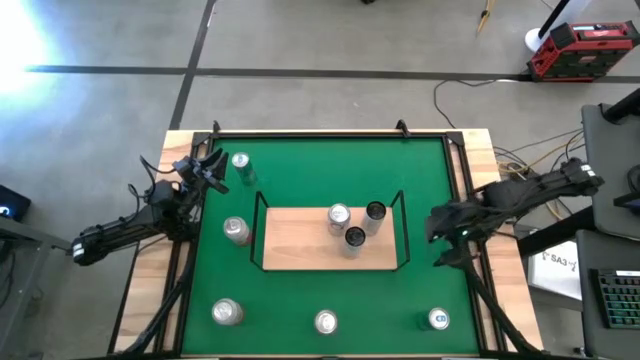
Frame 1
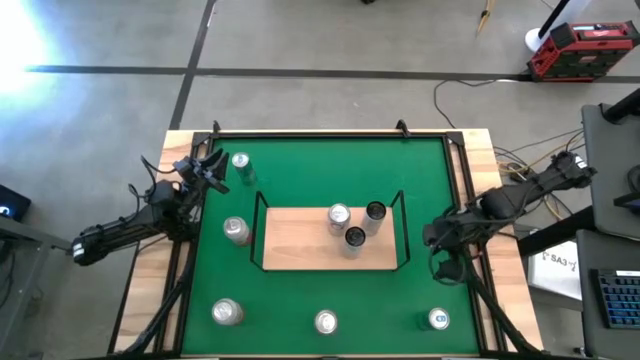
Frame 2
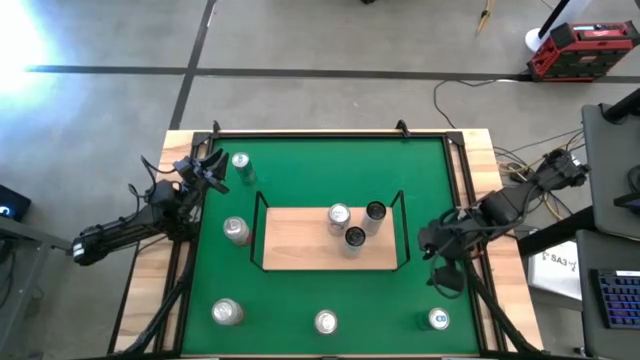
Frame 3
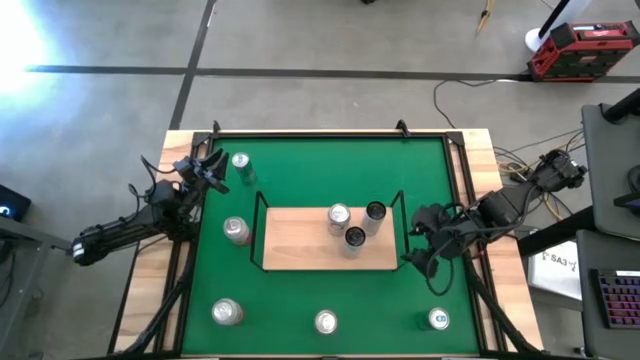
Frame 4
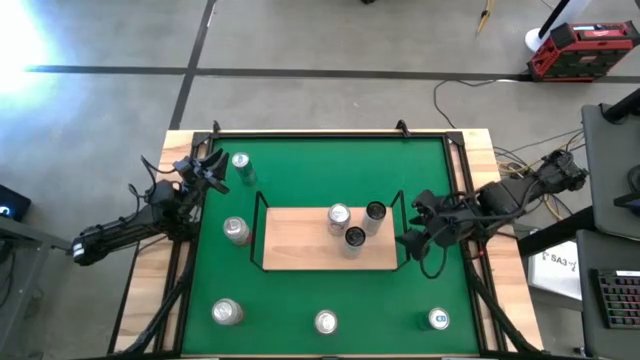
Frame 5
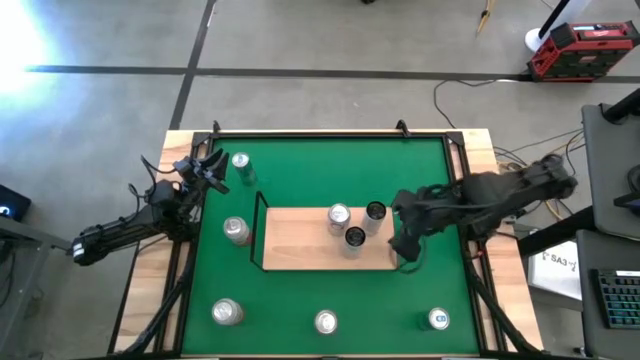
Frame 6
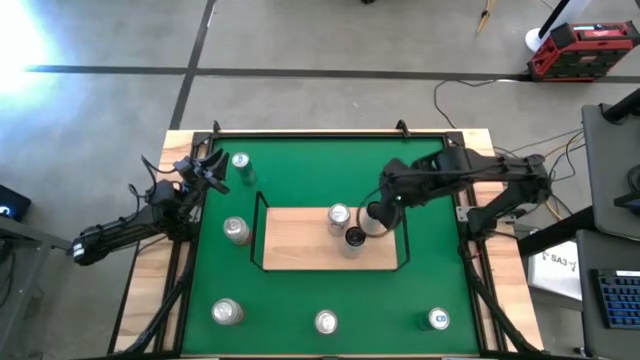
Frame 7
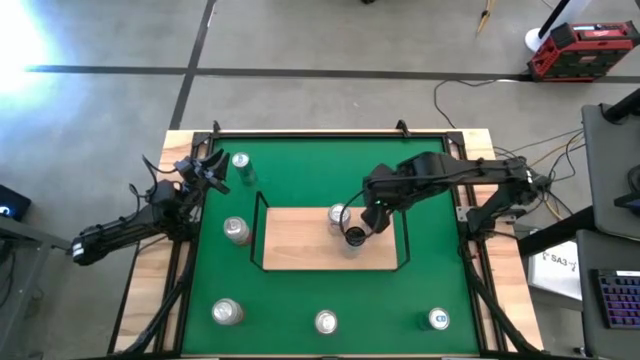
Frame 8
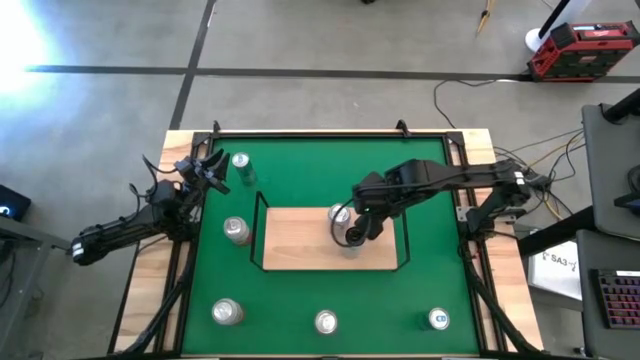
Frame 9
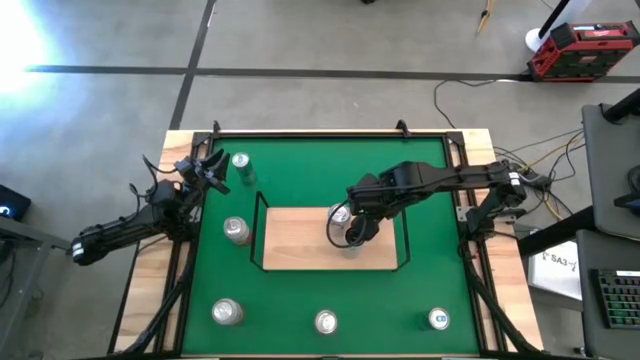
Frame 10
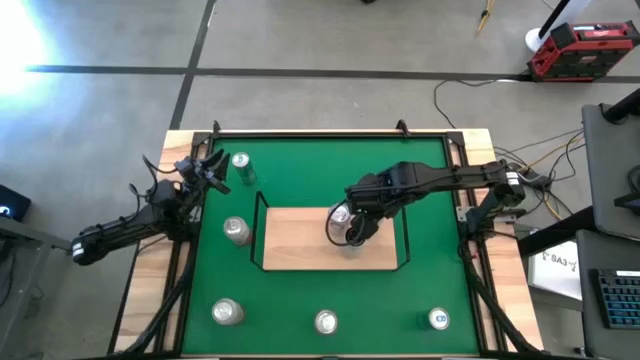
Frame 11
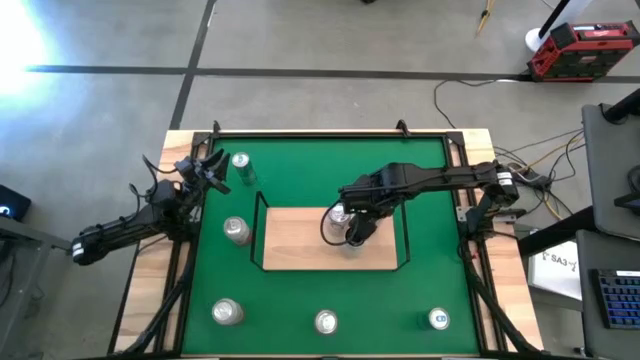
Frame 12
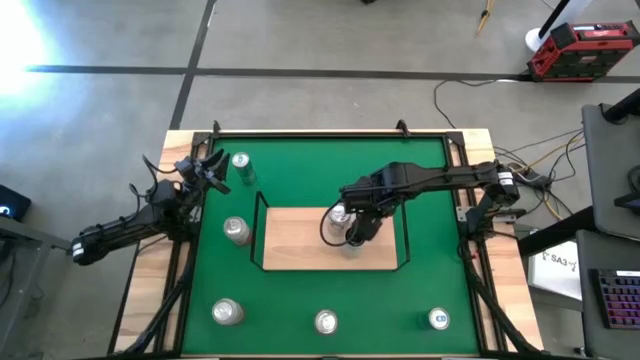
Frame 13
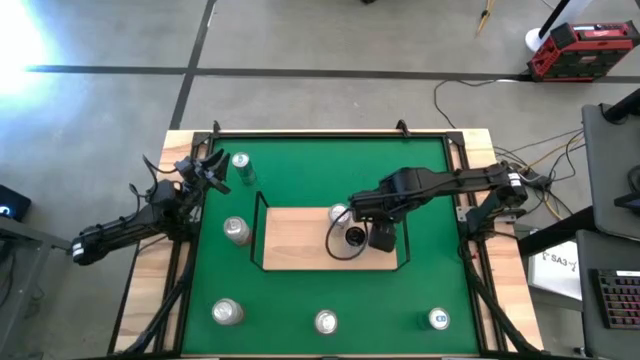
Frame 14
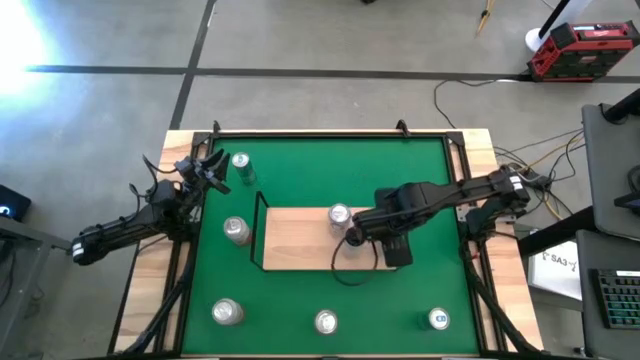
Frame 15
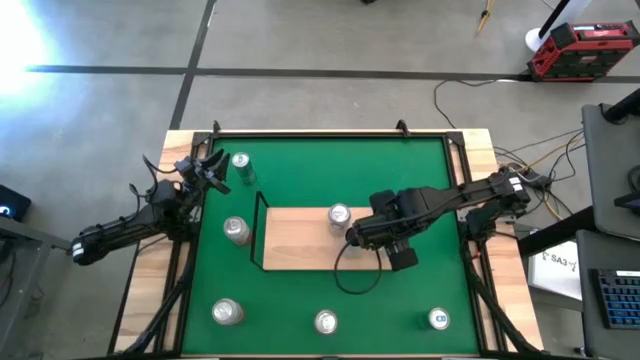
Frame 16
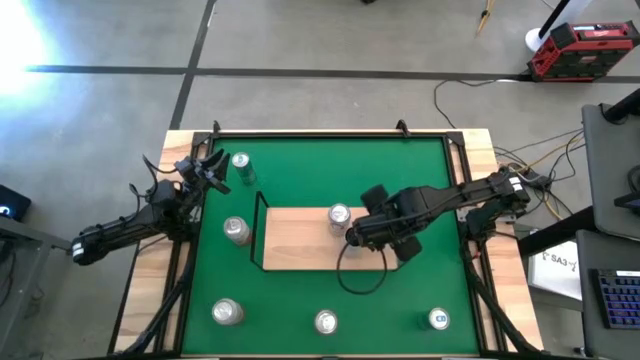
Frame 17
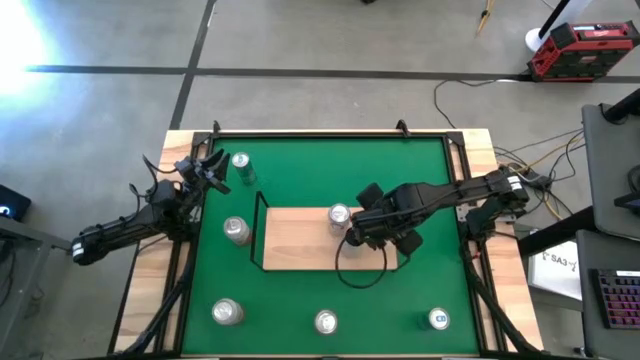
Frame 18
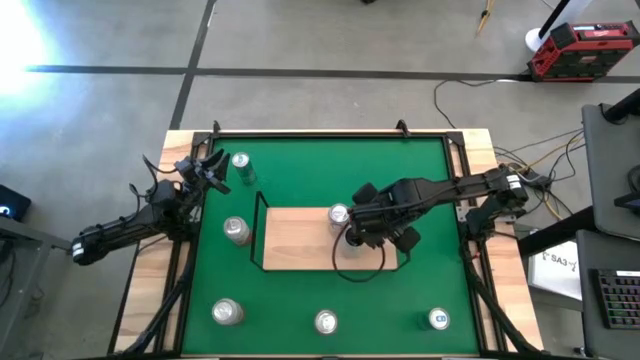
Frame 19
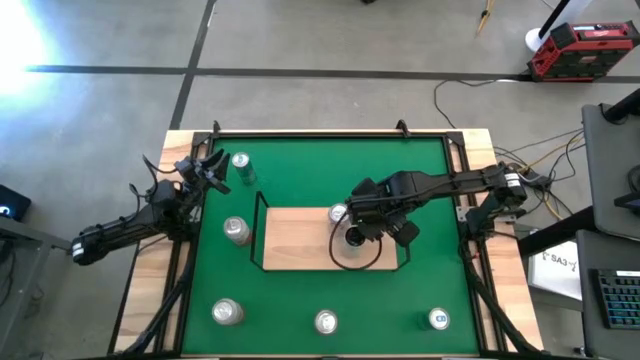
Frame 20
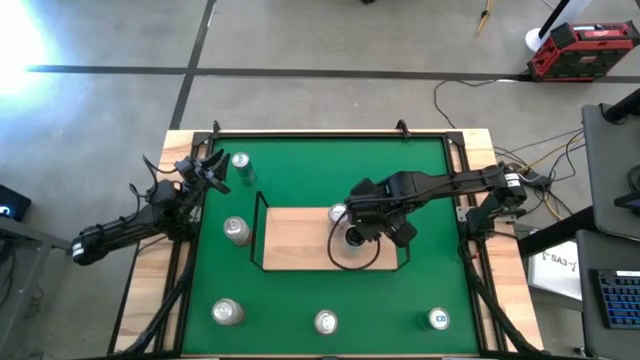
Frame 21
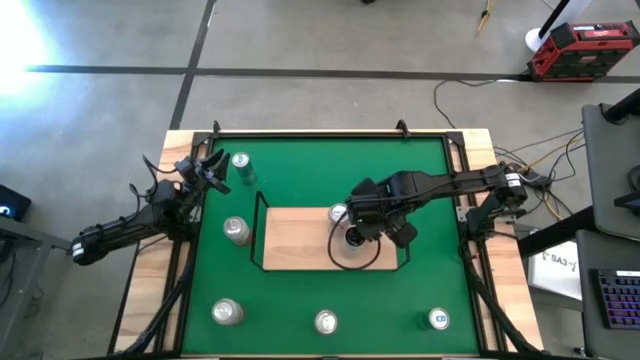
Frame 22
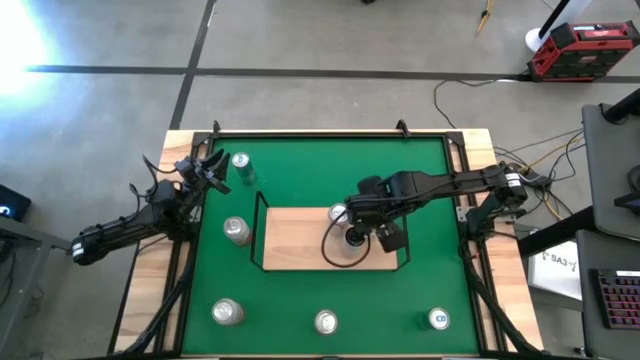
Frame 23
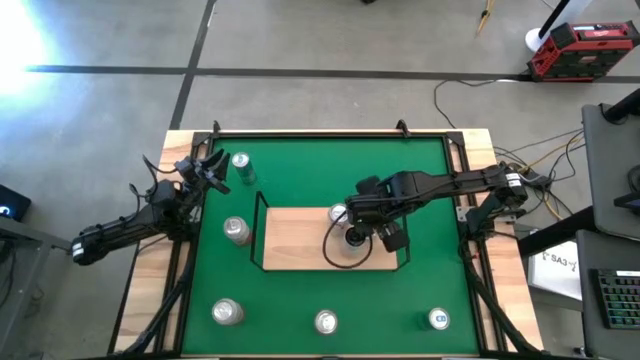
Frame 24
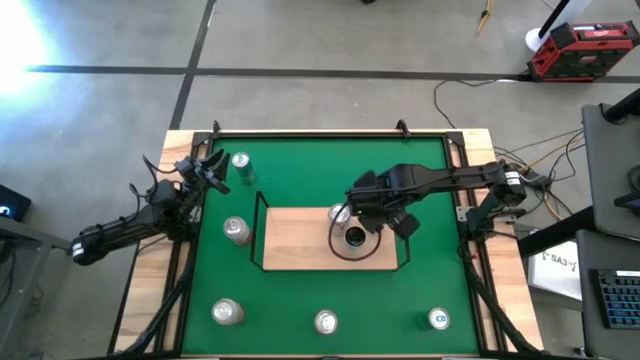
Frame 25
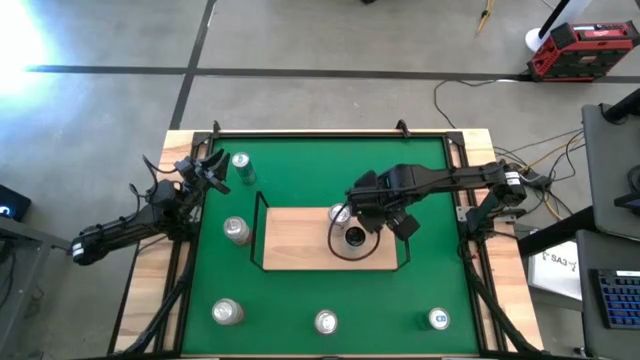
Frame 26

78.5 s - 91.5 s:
Task: Place canned beverage on shelf
Put the white-yellow soda can on the shelf

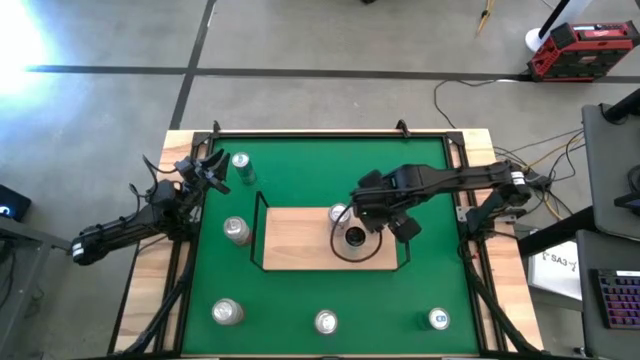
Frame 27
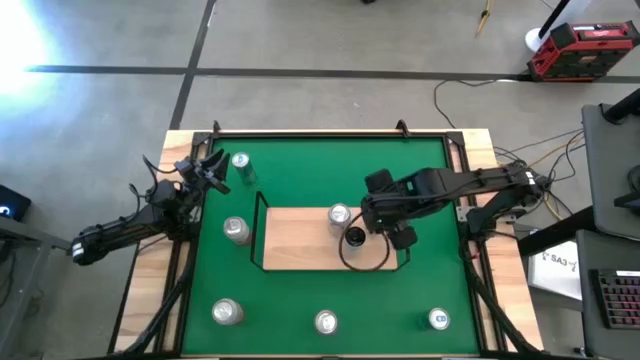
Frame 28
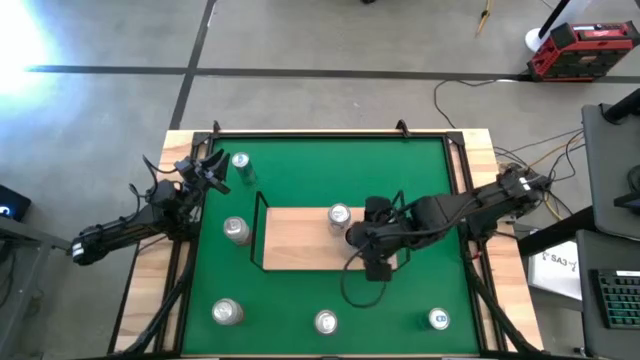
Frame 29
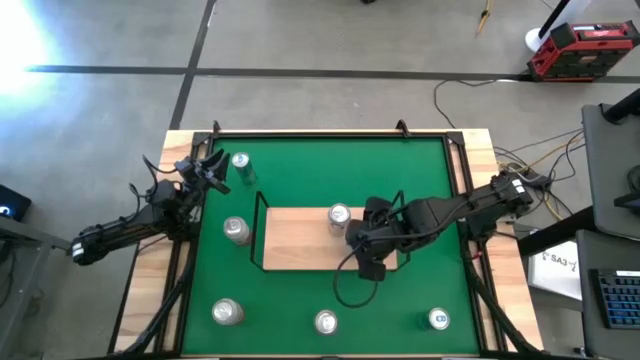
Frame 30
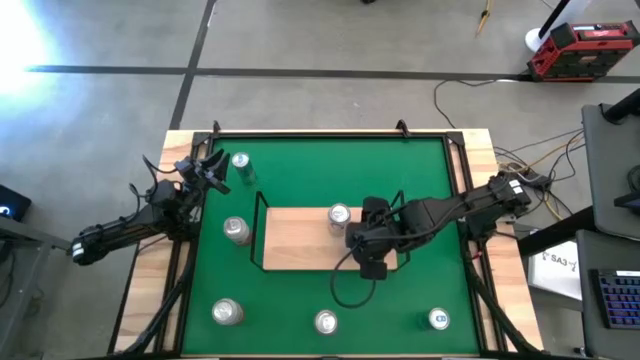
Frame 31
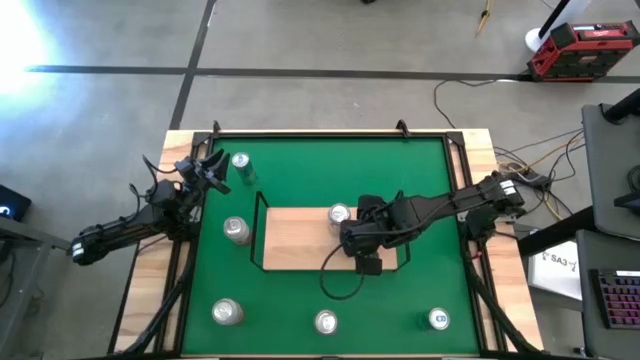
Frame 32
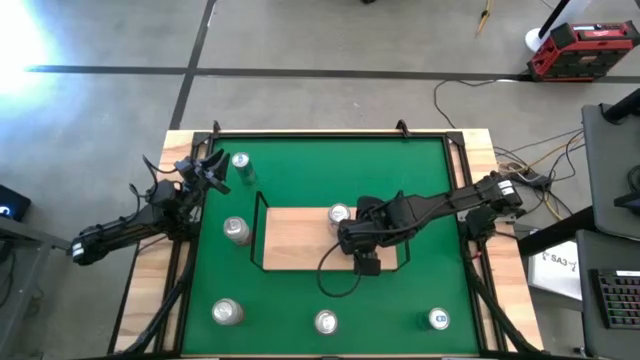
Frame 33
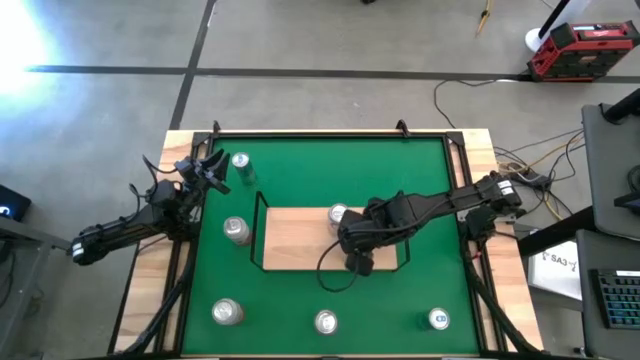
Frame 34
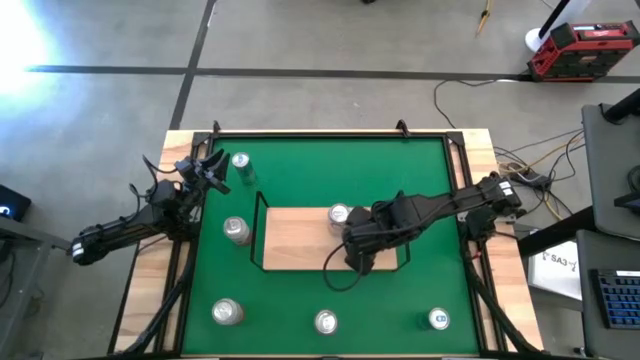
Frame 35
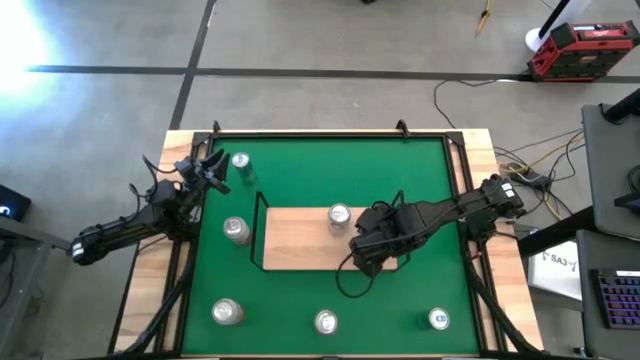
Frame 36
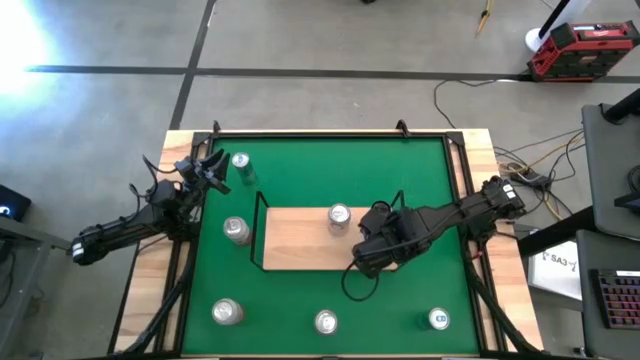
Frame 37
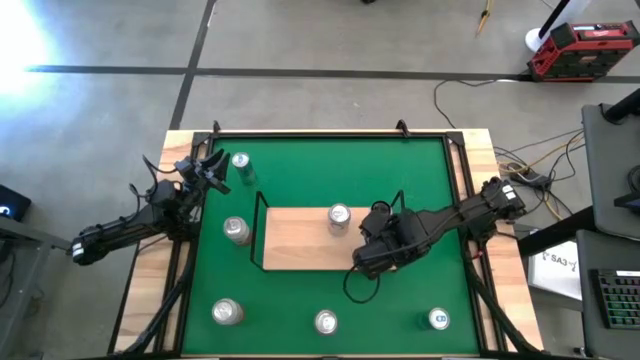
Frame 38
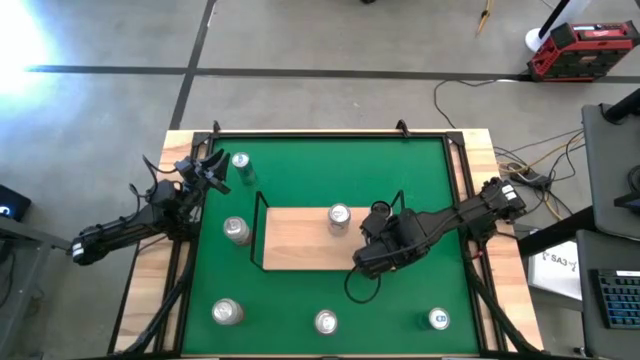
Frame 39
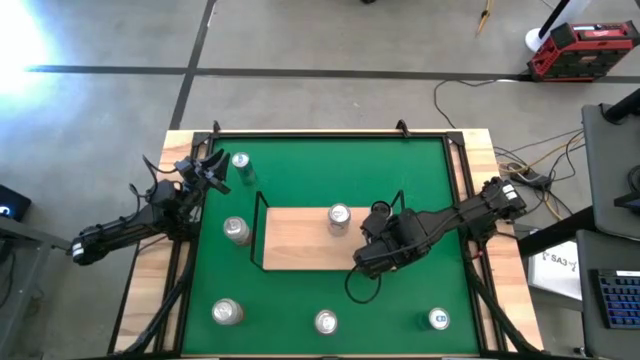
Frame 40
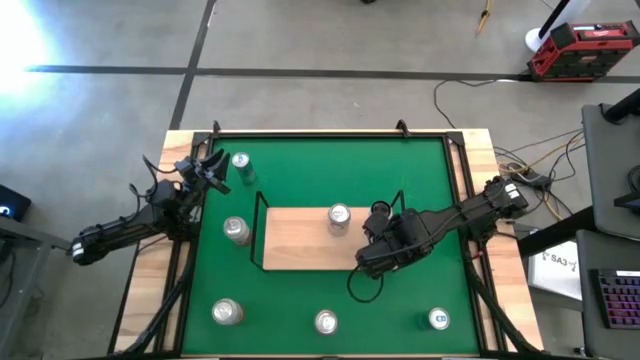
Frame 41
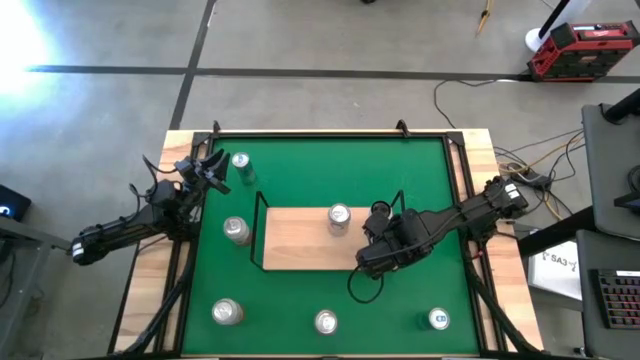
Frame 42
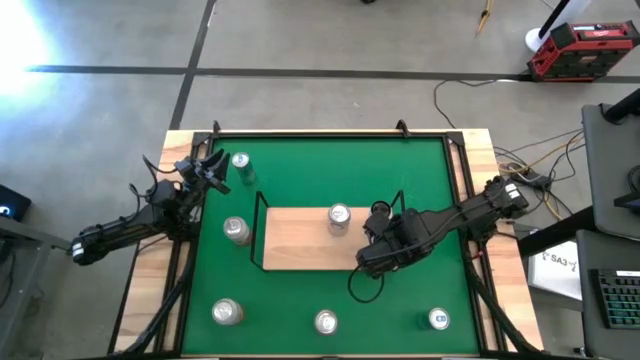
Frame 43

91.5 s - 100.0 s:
Adjust the white-yellow soda can on the shelf and align with the other white-yellow soda can
